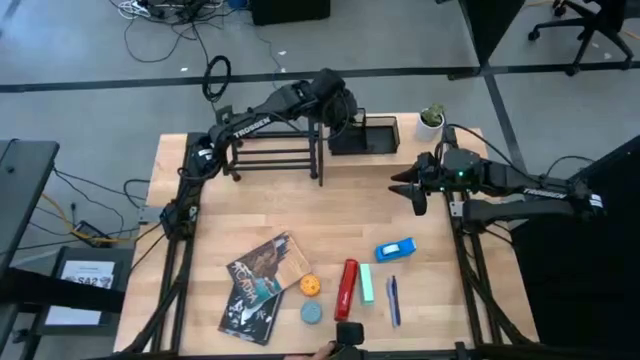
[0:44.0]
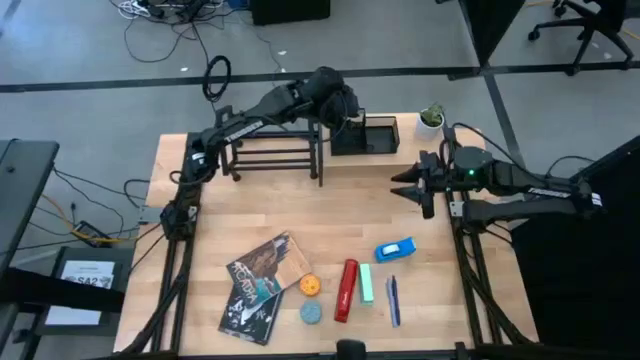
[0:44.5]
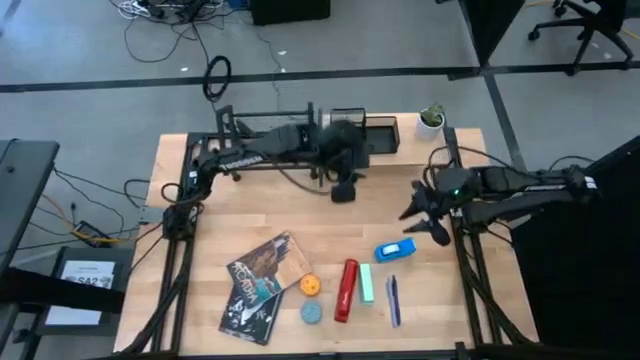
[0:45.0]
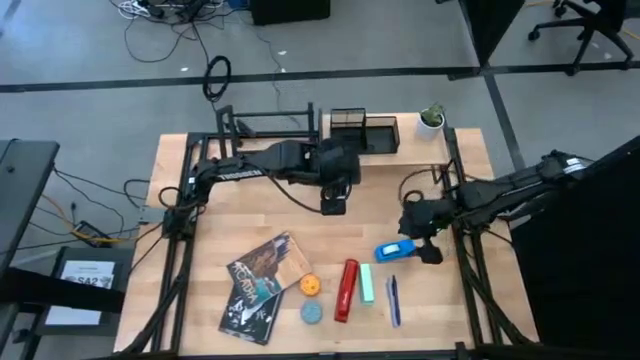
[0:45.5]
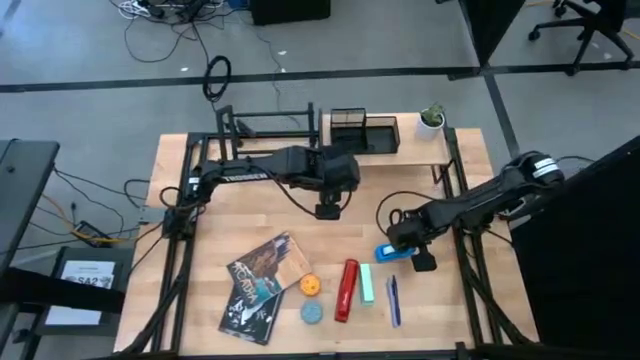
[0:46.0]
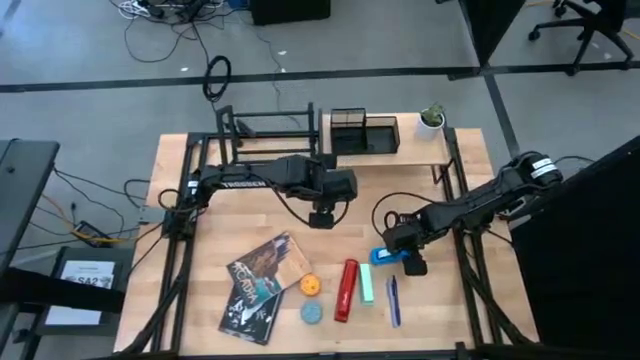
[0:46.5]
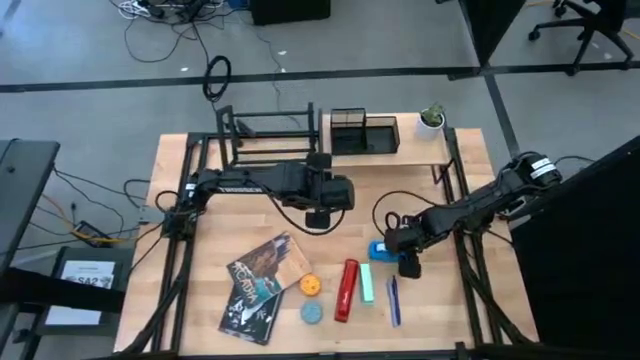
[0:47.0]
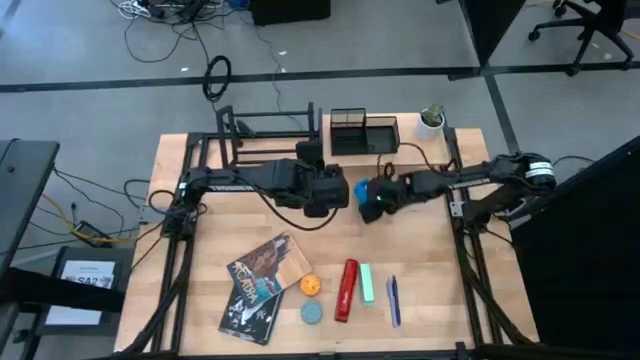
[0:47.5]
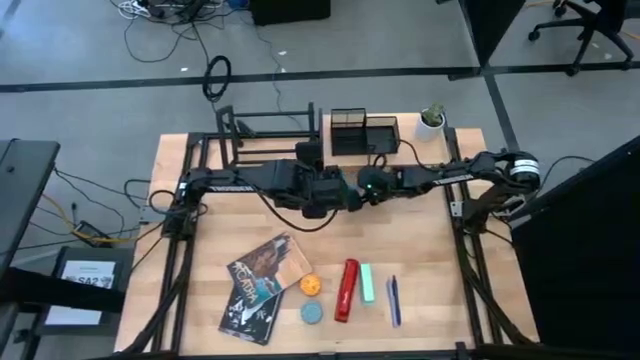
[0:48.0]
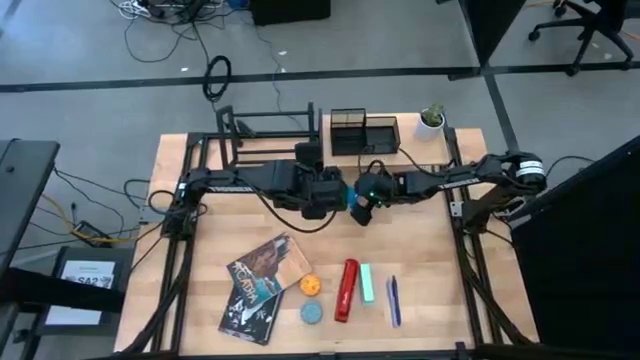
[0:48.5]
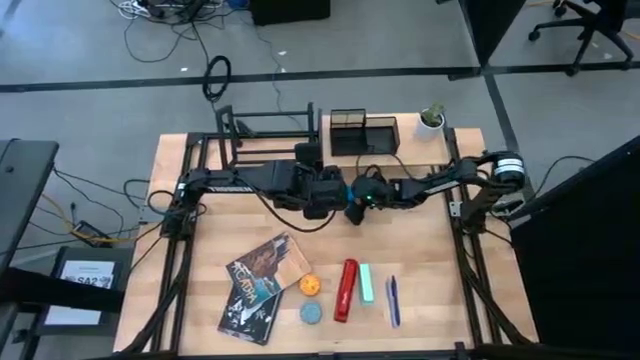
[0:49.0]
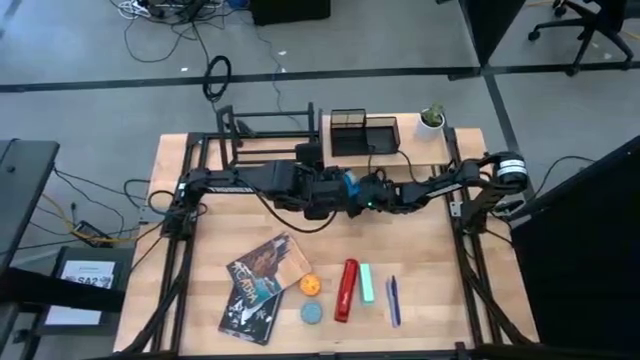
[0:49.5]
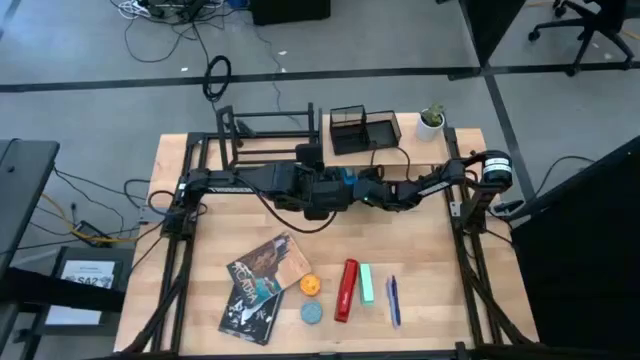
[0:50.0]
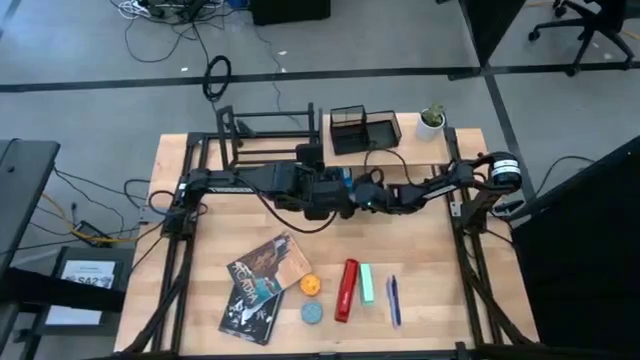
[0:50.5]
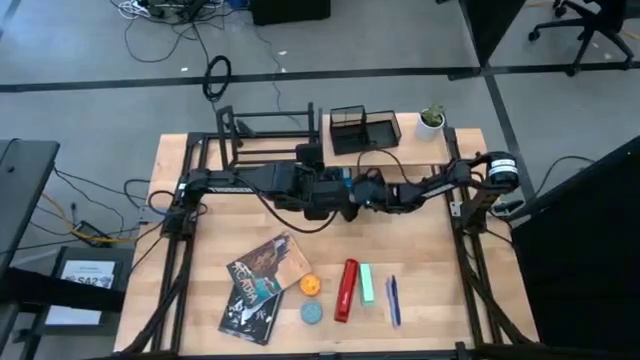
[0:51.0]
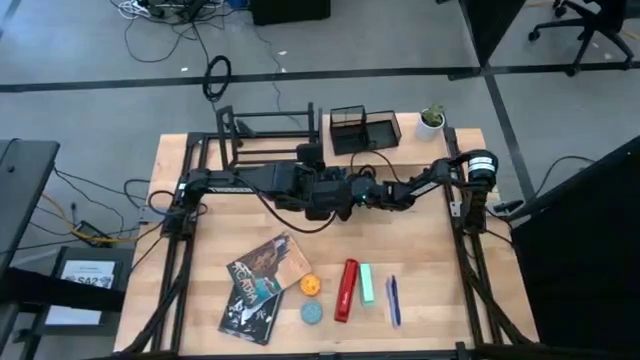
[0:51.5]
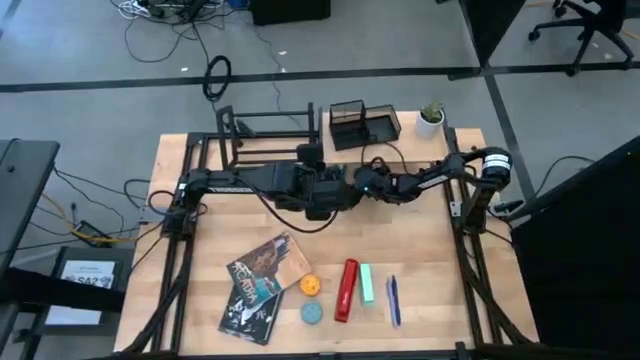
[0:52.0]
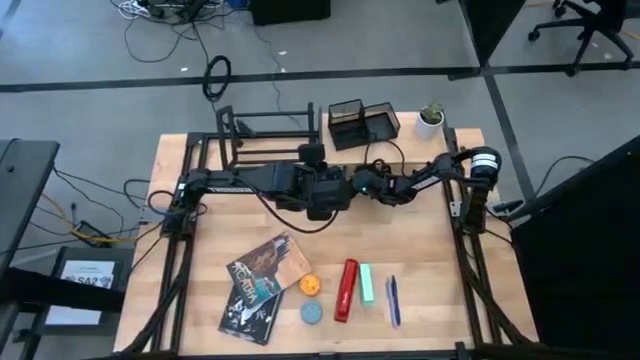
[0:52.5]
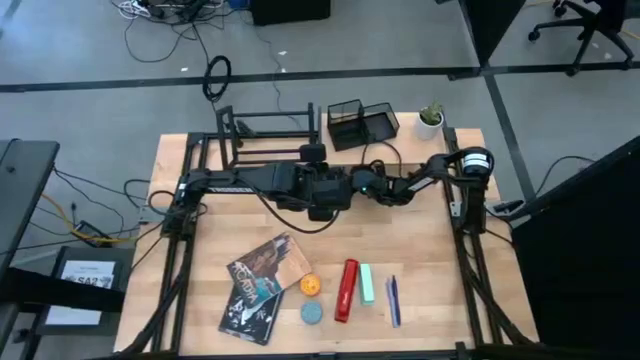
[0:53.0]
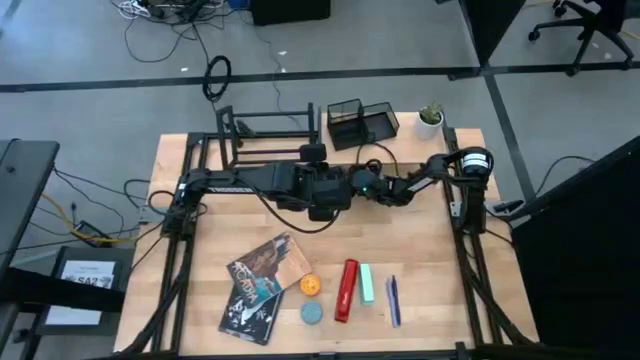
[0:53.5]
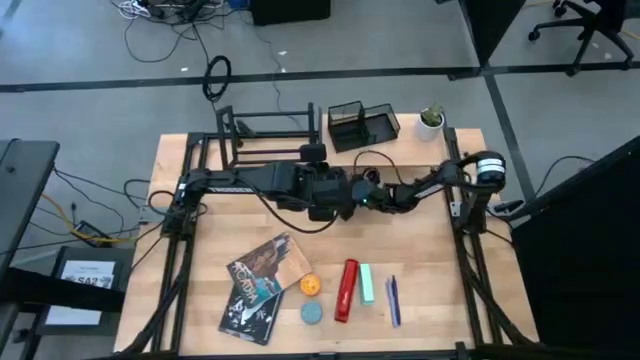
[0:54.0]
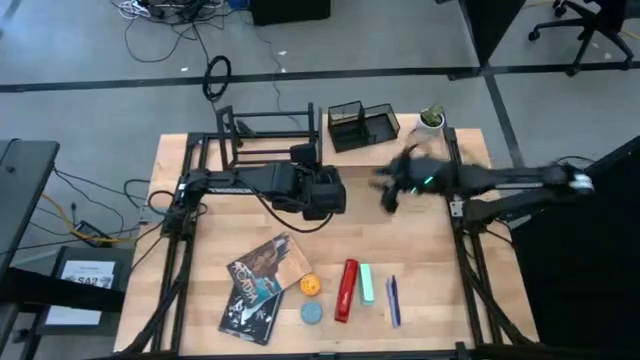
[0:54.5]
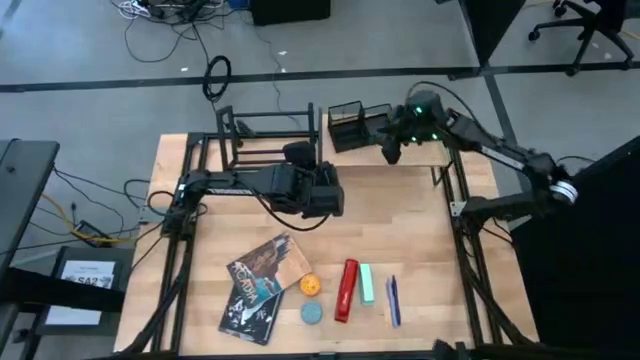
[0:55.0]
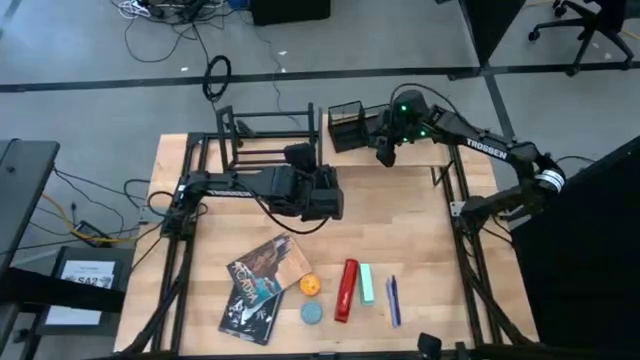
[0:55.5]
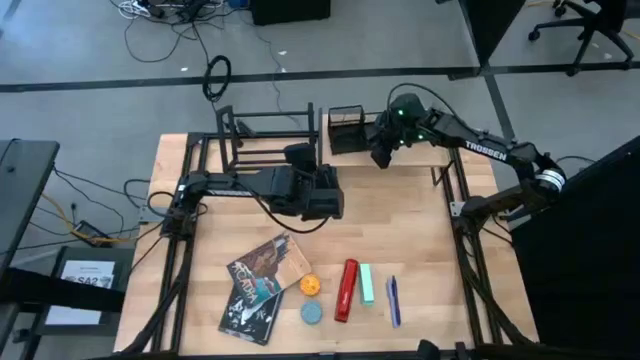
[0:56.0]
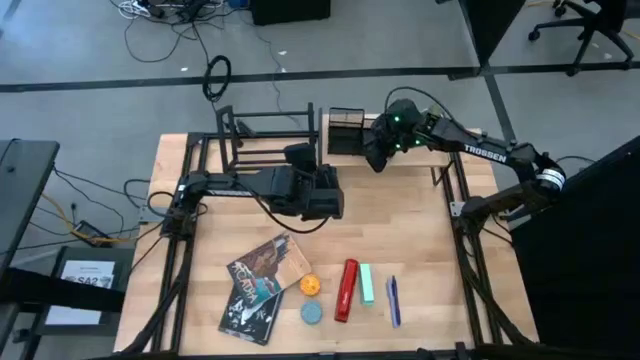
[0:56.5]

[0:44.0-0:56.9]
Task: Stock shelves
Put the blue tape dispenser under the shelf

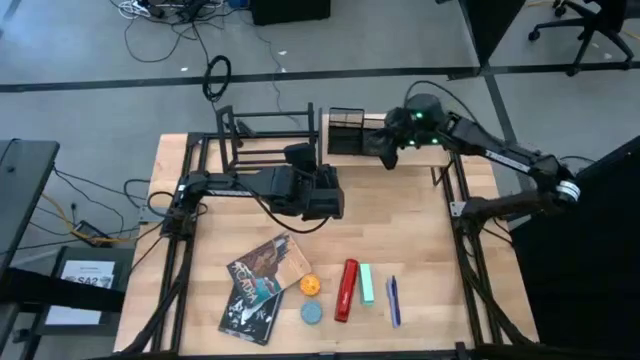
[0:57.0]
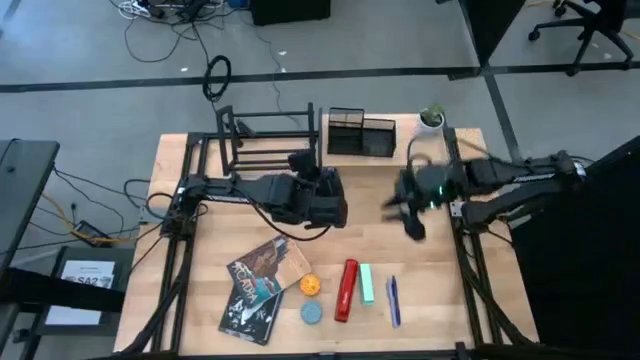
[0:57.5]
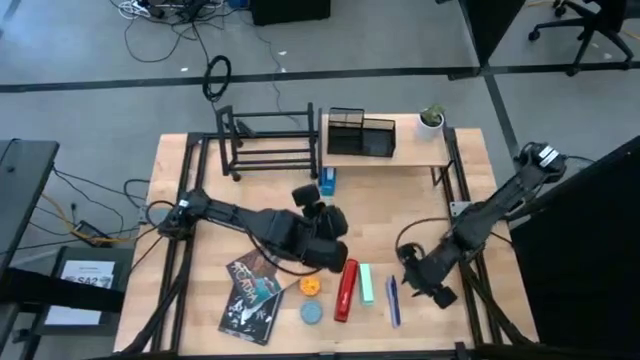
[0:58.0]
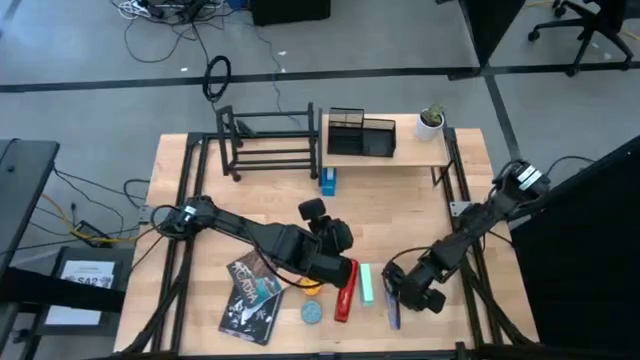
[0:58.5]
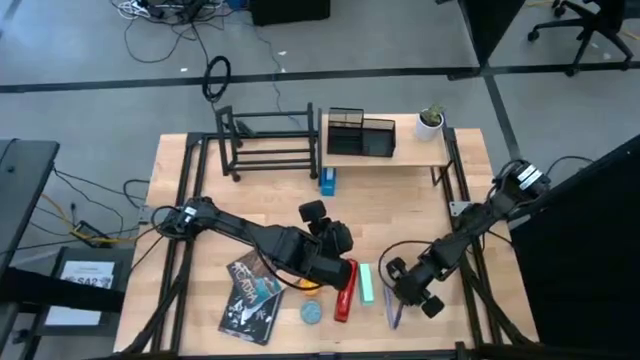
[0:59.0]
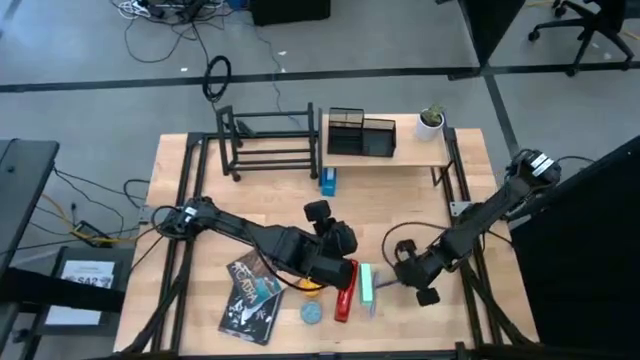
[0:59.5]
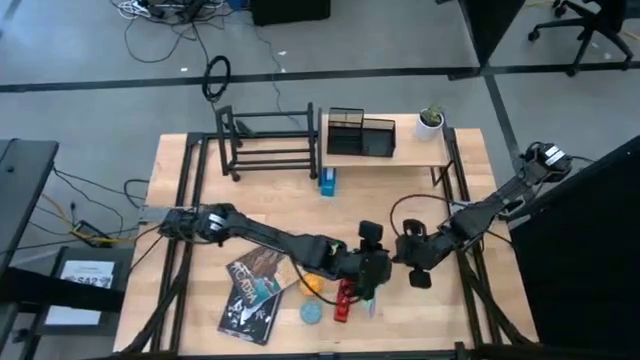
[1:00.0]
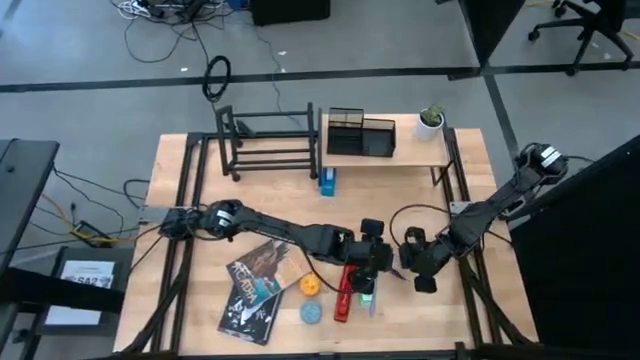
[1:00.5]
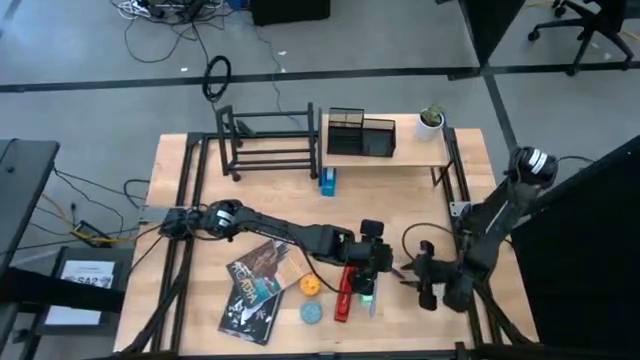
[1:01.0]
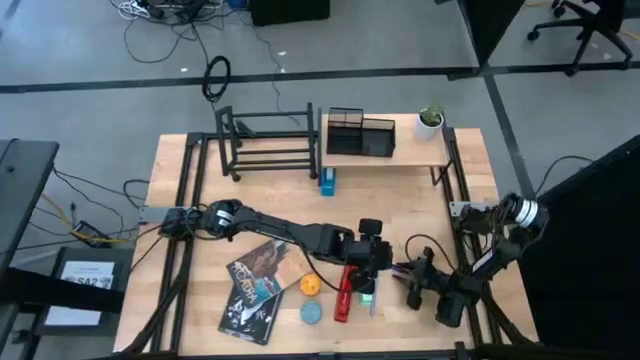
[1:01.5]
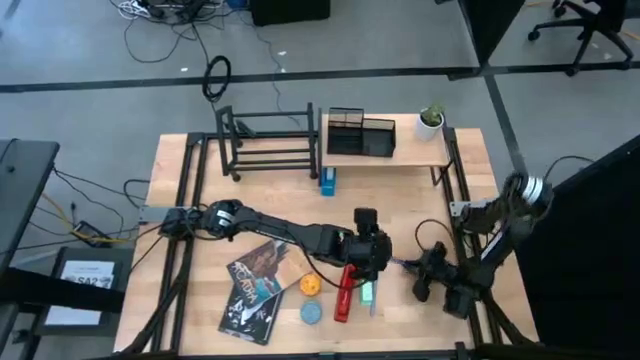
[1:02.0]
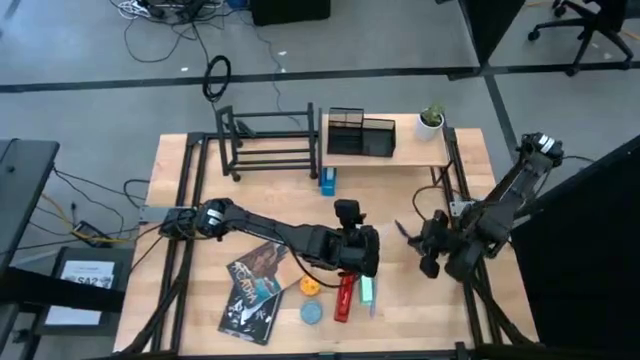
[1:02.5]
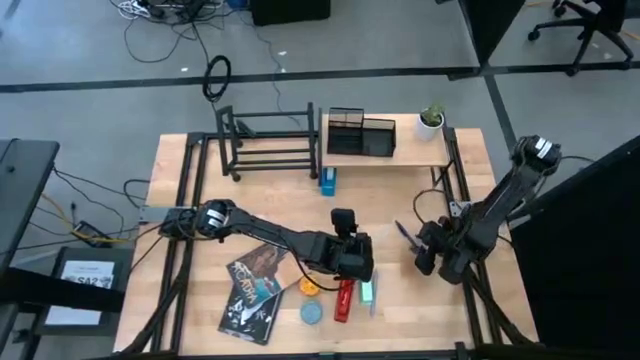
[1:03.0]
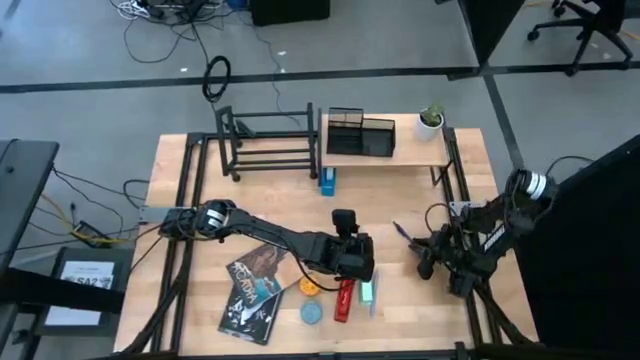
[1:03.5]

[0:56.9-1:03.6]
Put the blue ballpen on the pen holder

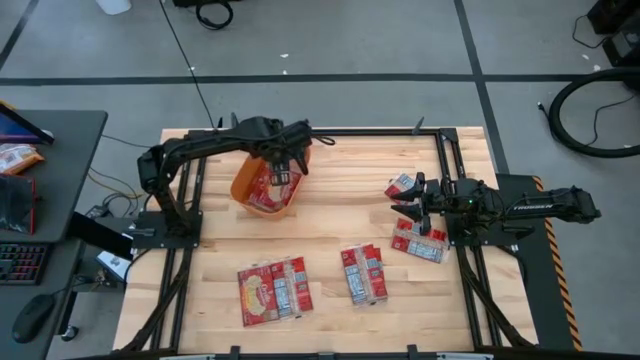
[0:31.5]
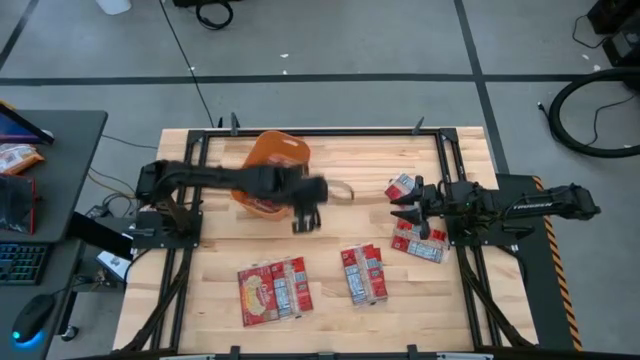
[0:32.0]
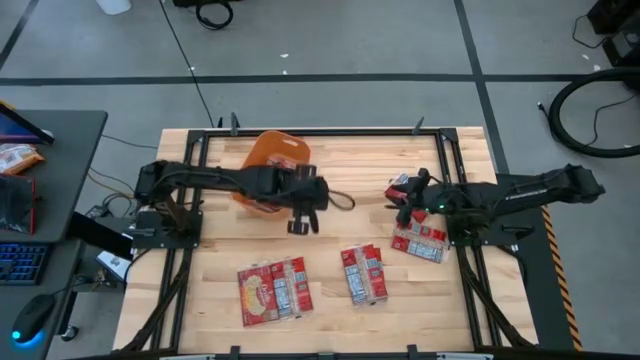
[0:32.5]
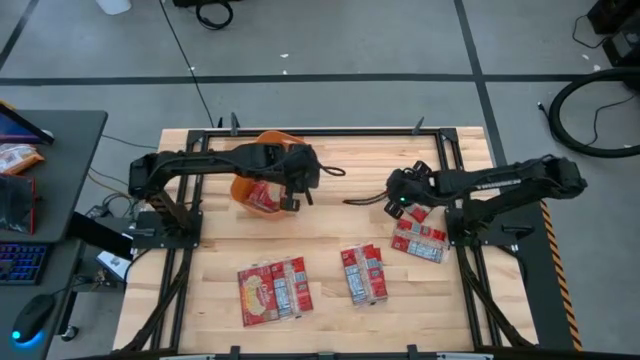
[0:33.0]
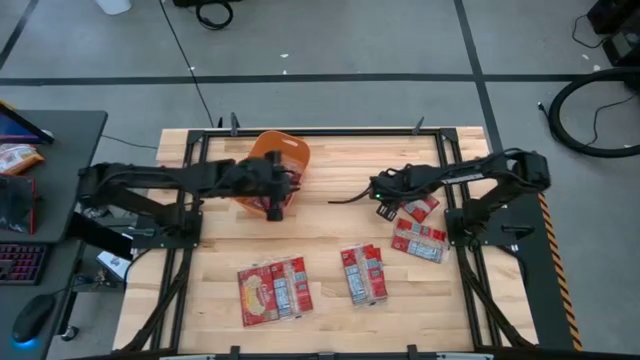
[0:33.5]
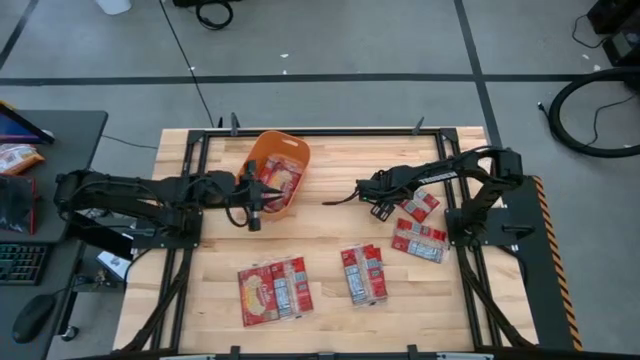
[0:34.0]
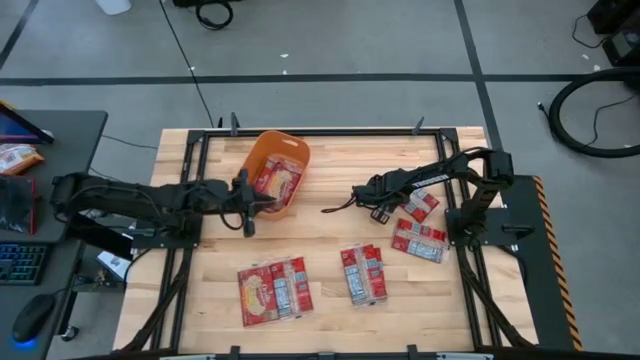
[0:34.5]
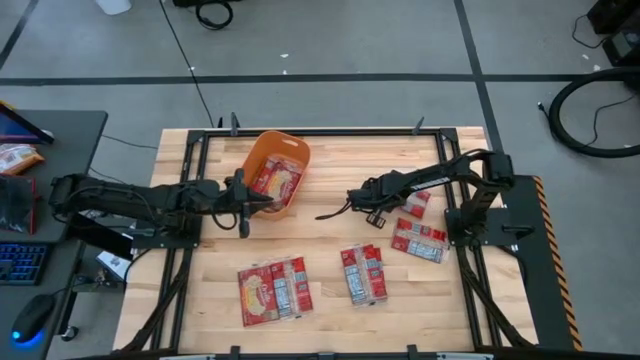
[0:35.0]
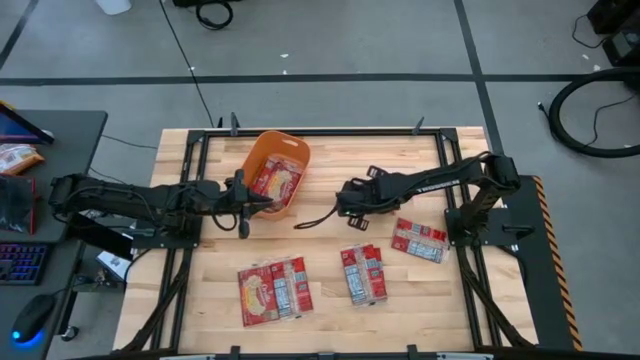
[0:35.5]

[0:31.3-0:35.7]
Task: Sort popcorn bags into baskets
Stack the popcorn pack on top of the other popcorn into the orange bin
